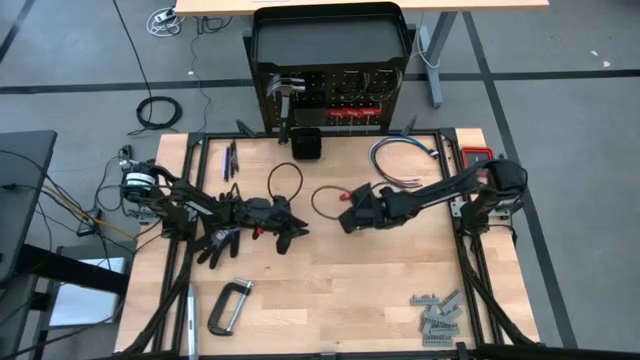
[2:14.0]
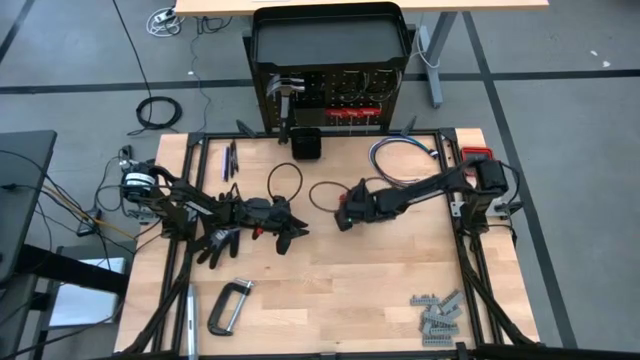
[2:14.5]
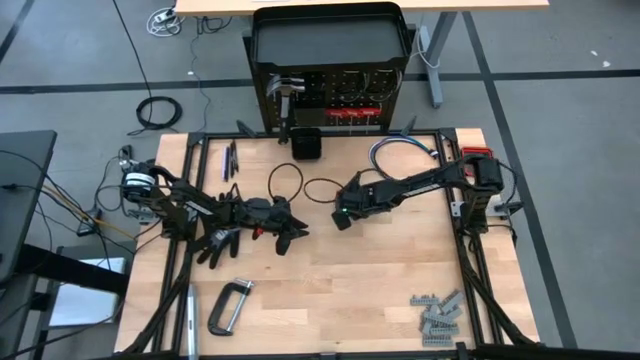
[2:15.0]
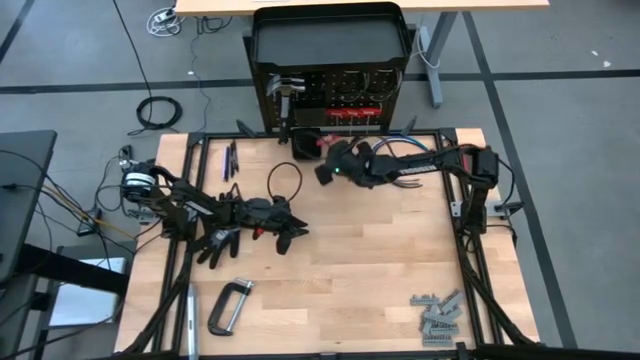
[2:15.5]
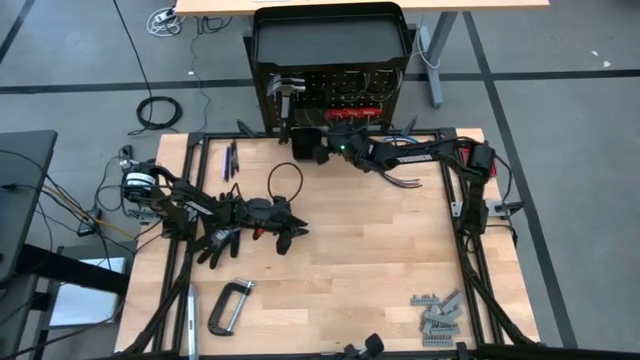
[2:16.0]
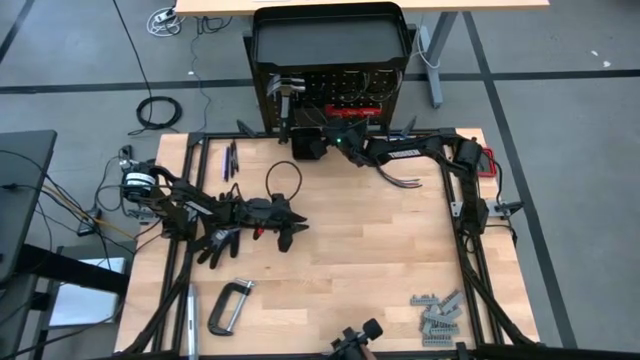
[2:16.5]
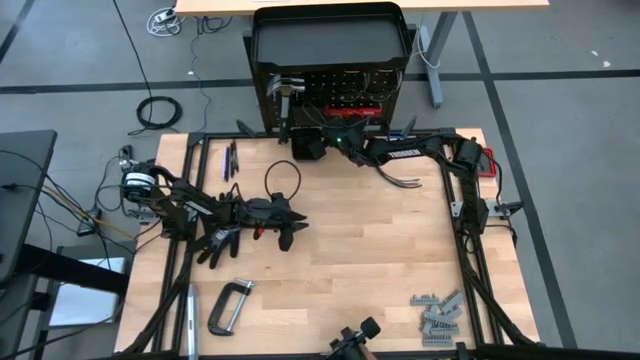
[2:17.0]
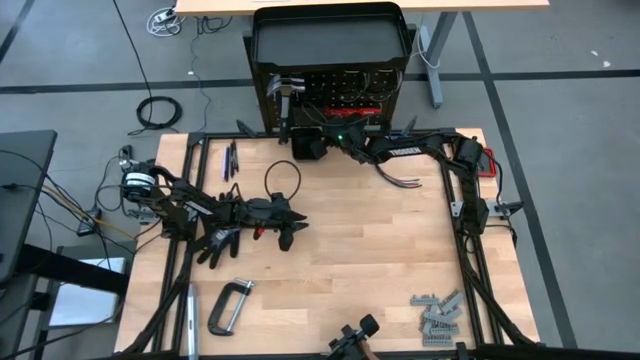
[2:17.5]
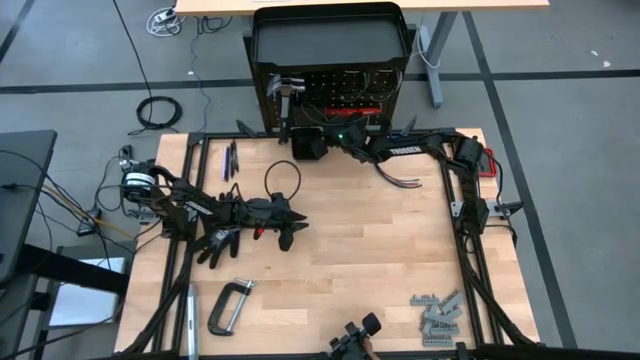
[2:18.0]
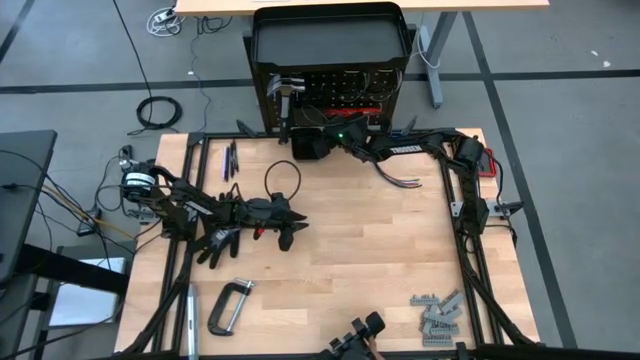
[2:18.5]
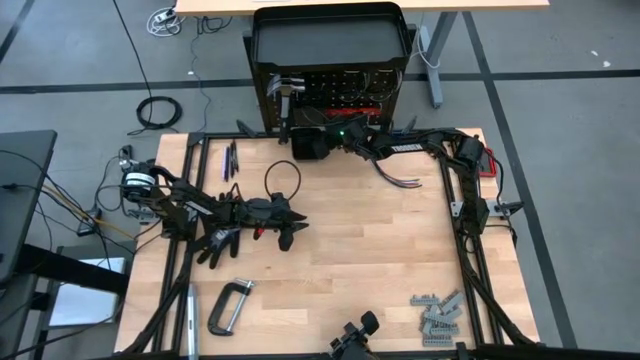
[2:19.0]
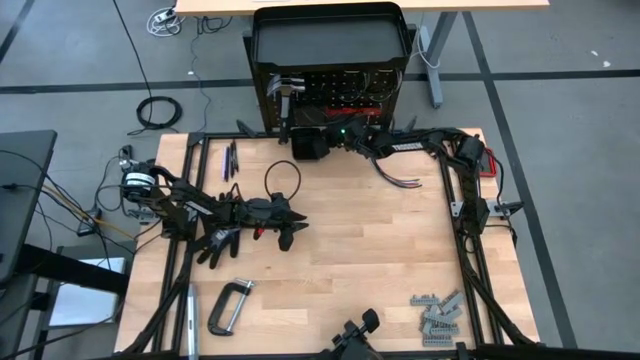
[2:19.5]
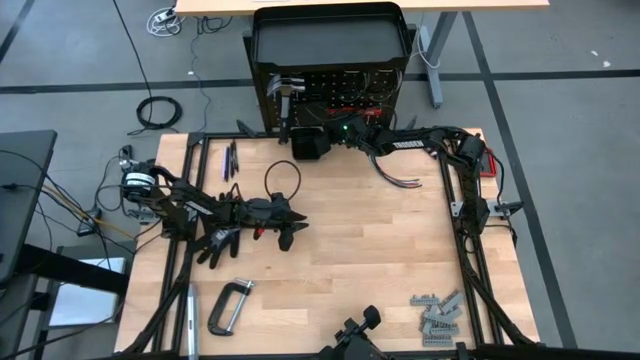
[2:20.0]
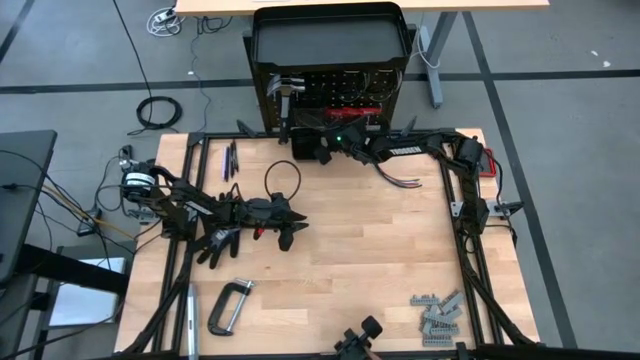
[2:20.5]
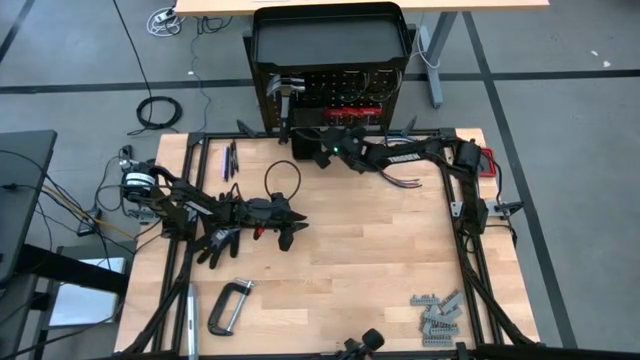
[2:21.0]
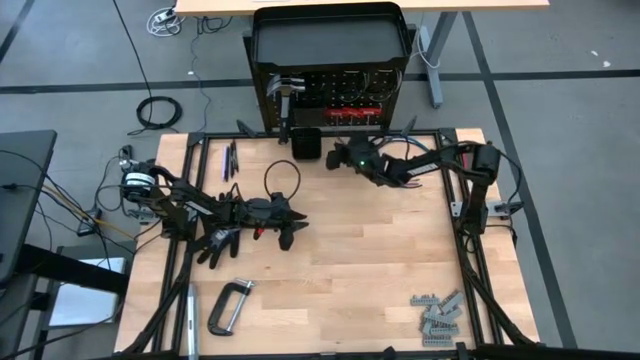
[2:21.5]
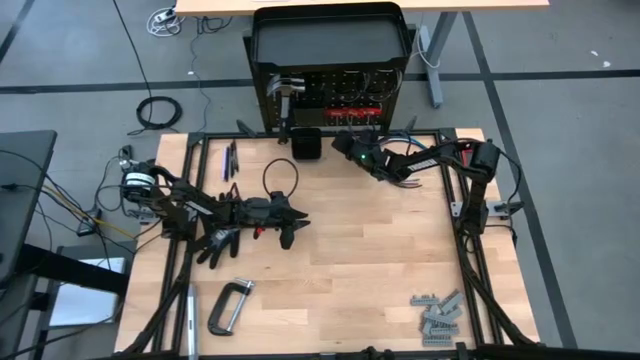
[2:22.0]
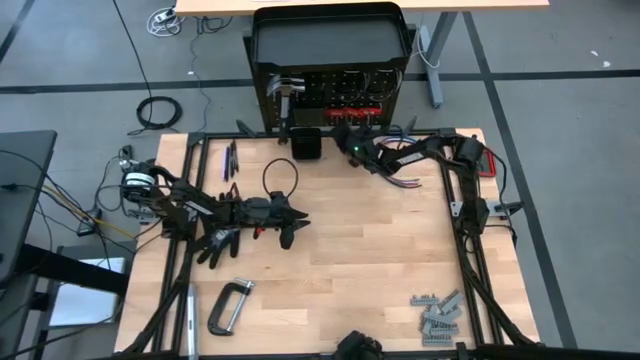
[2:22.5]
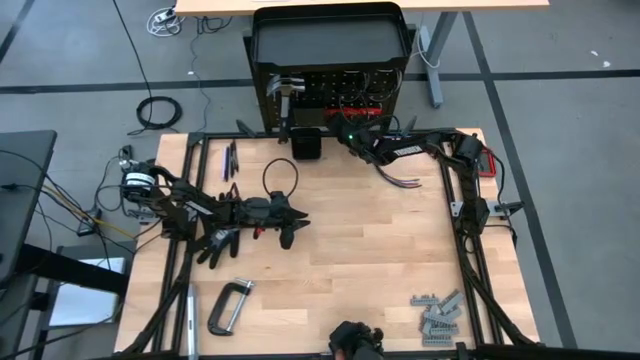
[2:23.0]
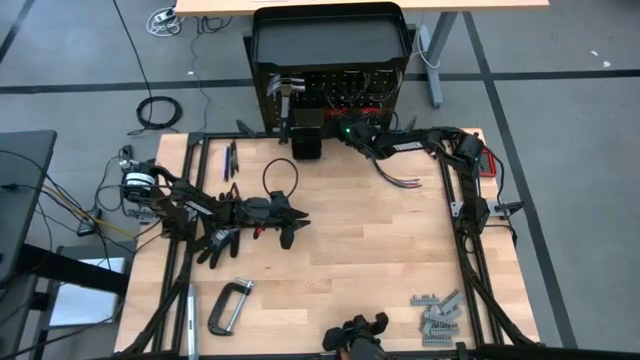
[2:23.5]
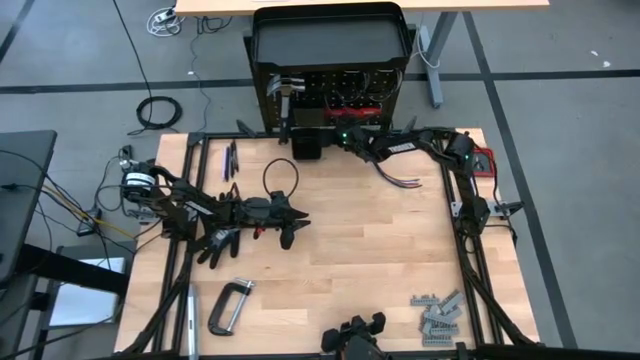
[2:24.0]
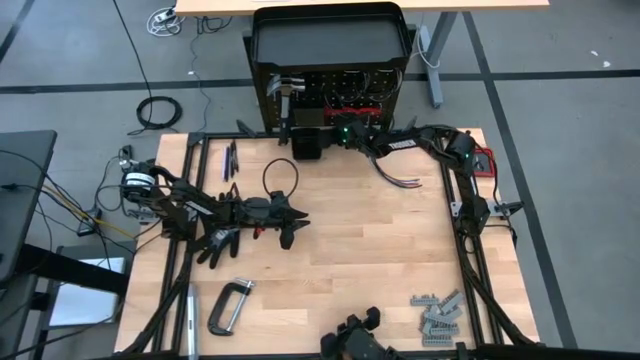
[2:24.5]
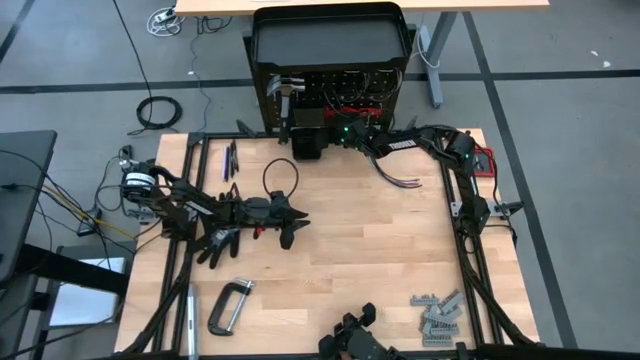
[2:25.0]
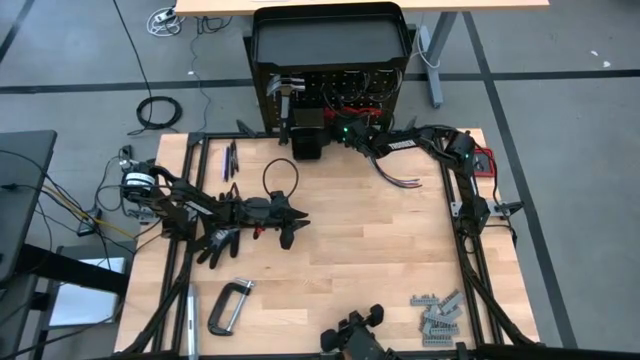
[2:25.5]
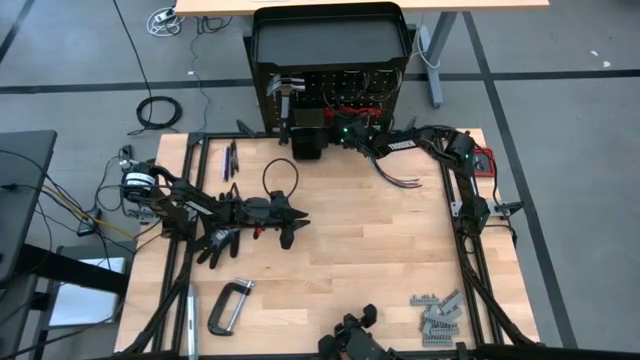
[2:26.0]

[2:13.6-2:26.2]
Task: Hang tools onto peg board
Hang the red allen wrench on the peg board

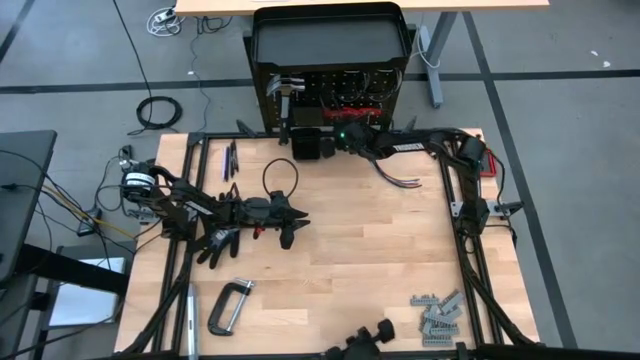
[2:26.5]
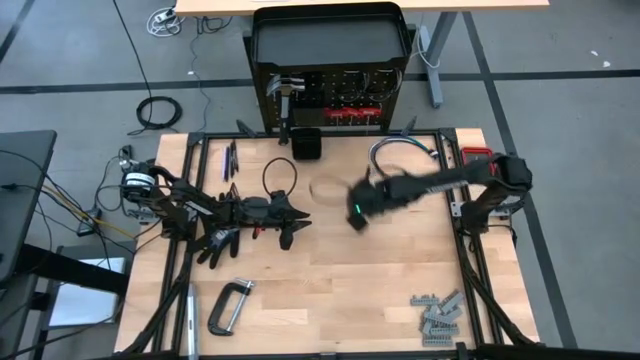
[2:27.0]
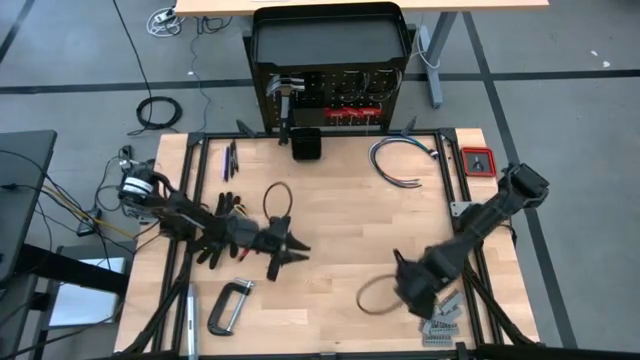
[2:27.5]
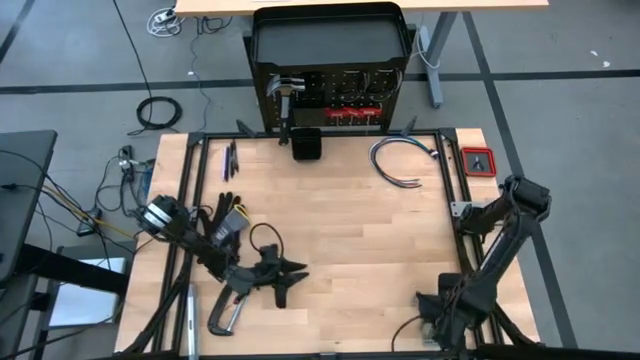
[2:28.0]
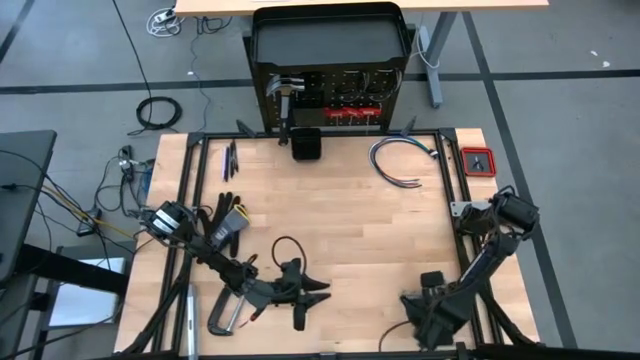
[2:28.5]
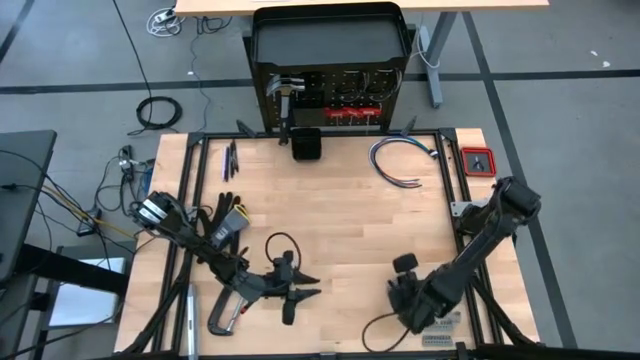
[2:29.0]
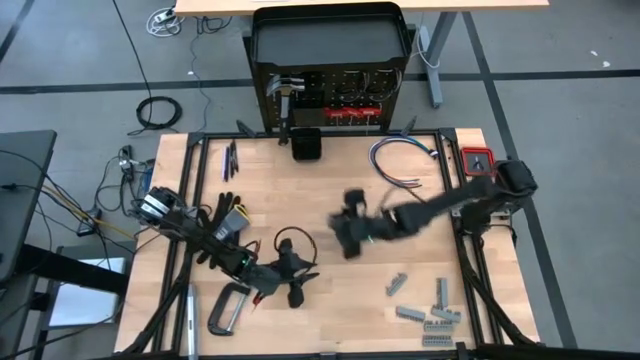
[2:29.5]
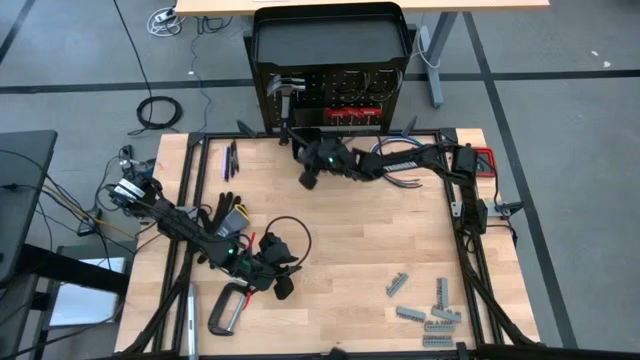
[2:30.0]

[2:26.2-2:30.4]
Put the gray terminal block into the black bin
